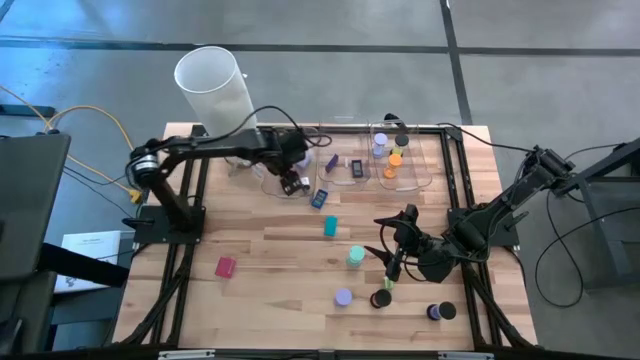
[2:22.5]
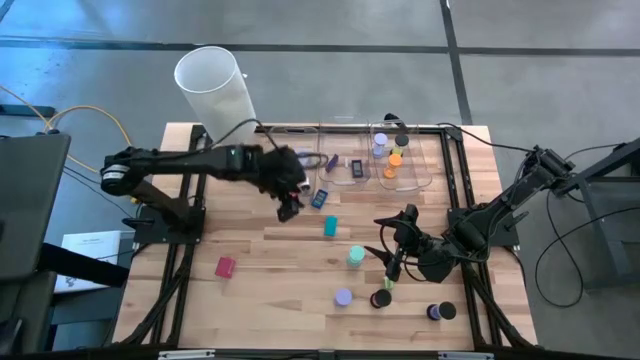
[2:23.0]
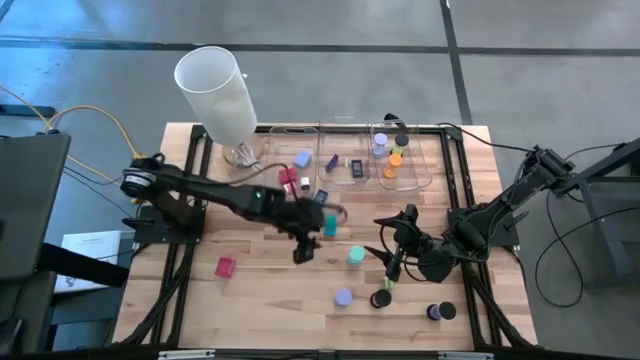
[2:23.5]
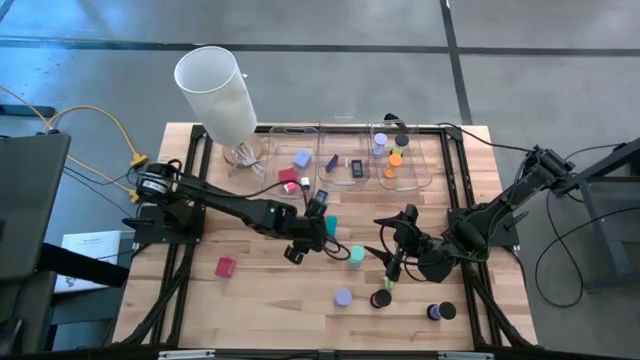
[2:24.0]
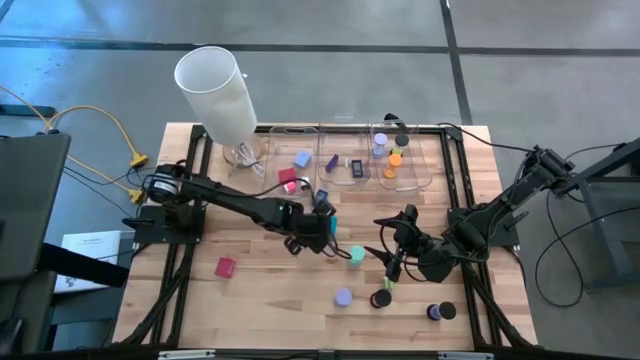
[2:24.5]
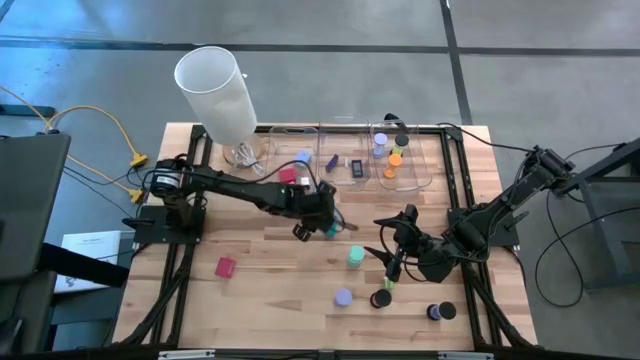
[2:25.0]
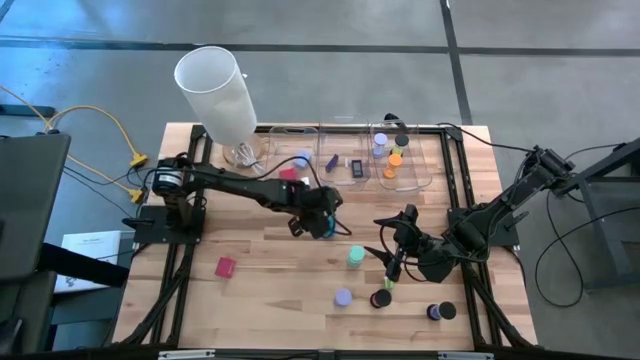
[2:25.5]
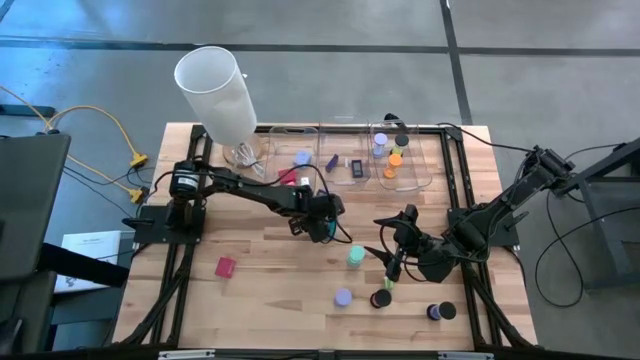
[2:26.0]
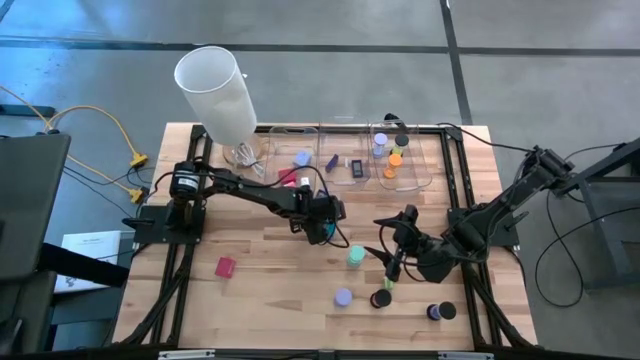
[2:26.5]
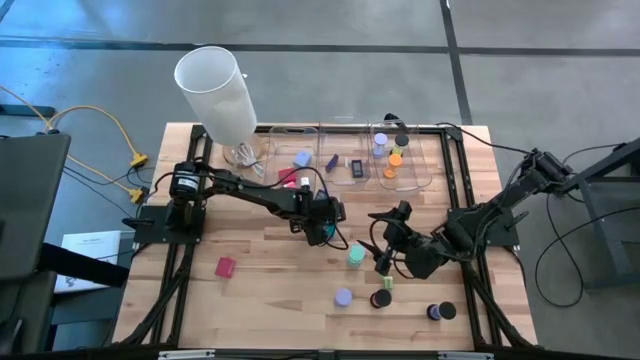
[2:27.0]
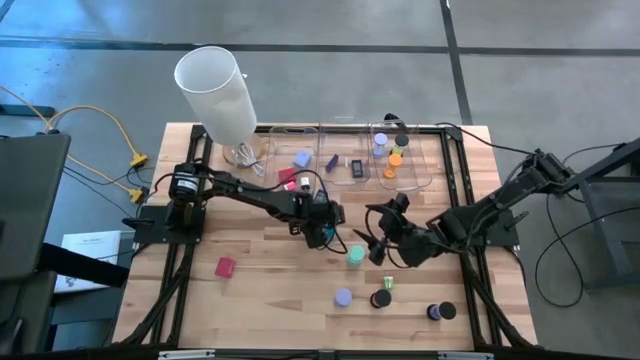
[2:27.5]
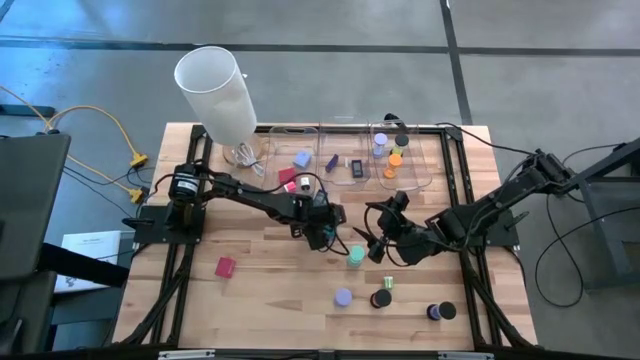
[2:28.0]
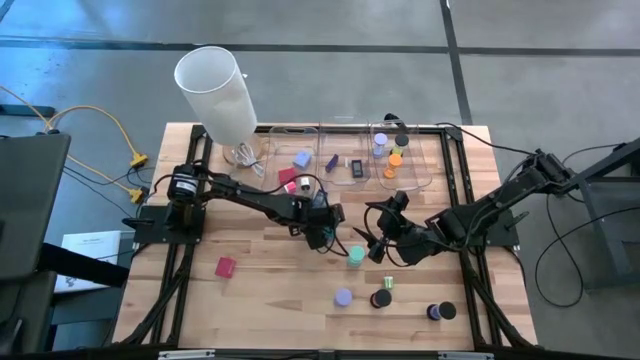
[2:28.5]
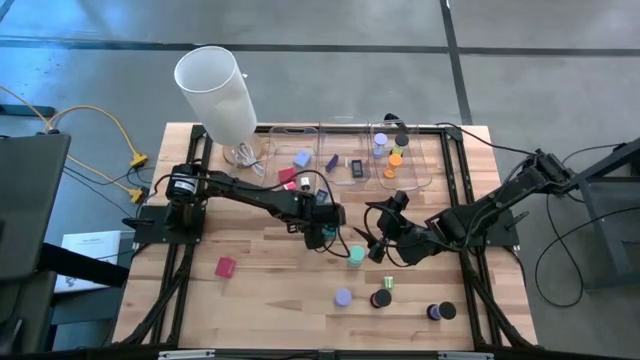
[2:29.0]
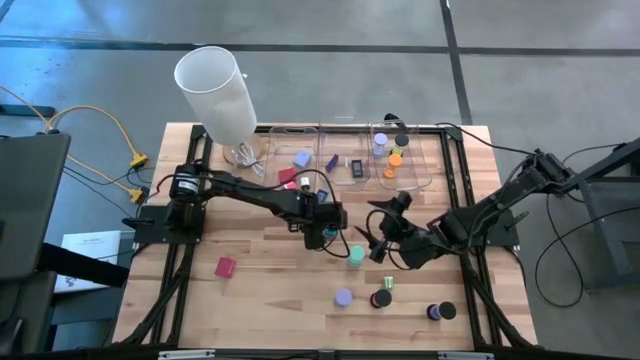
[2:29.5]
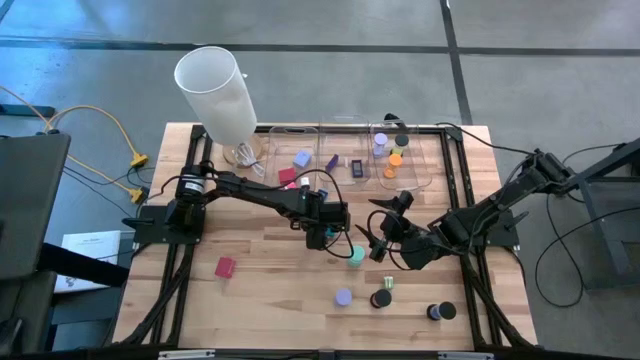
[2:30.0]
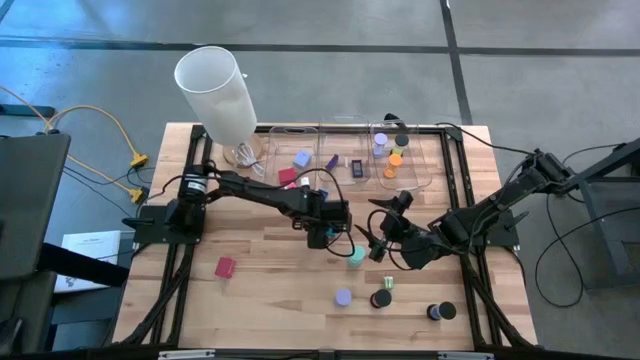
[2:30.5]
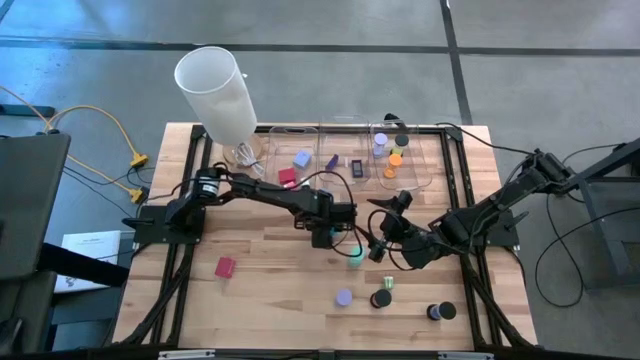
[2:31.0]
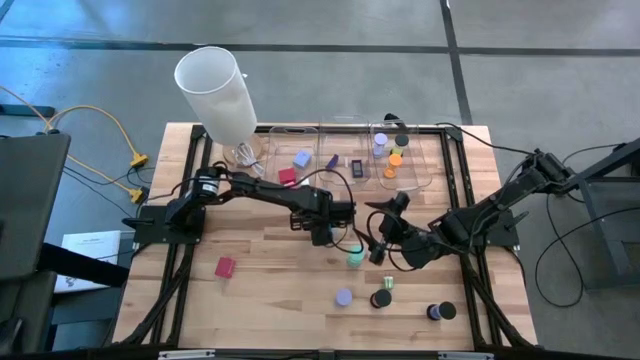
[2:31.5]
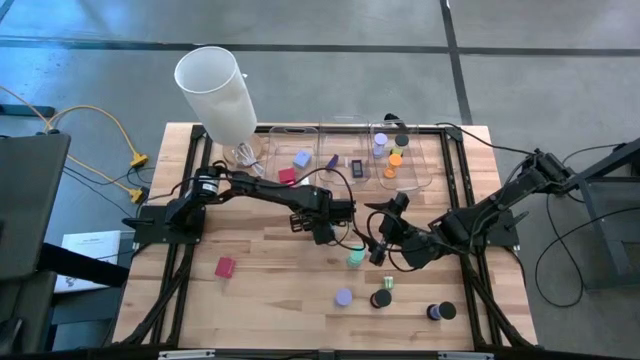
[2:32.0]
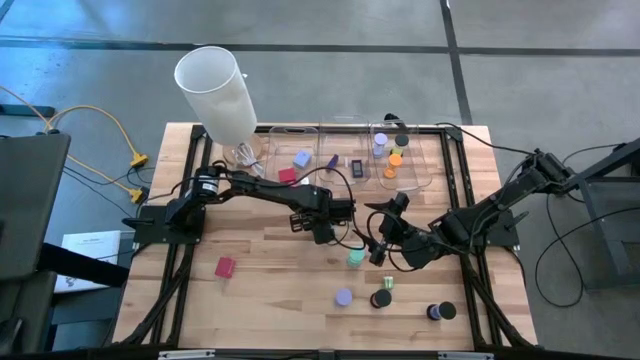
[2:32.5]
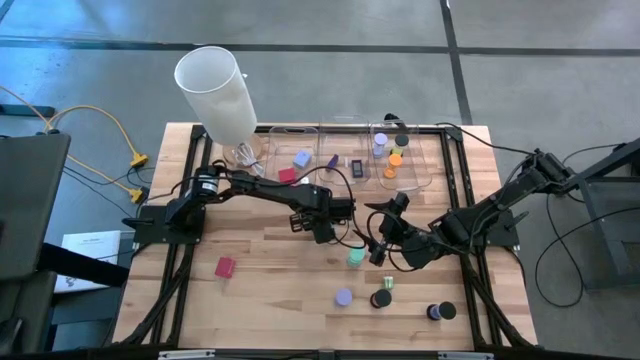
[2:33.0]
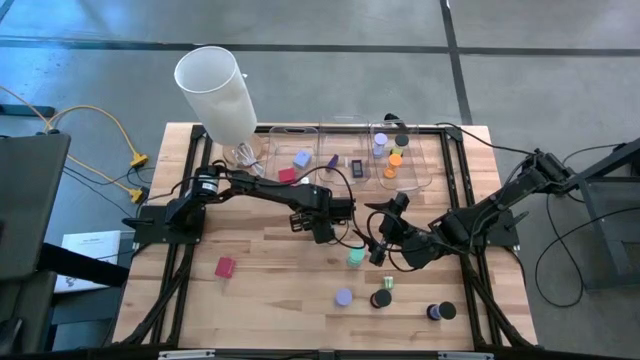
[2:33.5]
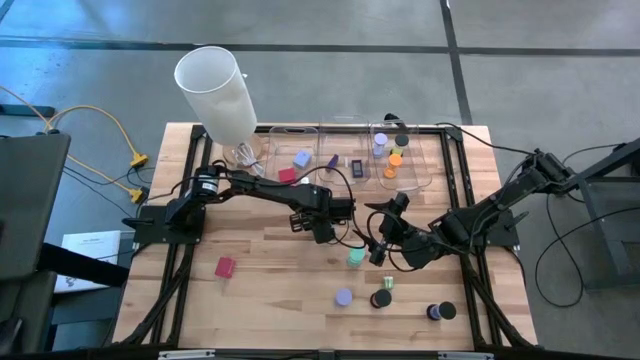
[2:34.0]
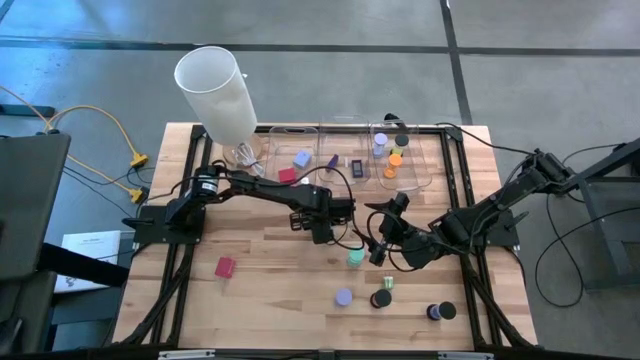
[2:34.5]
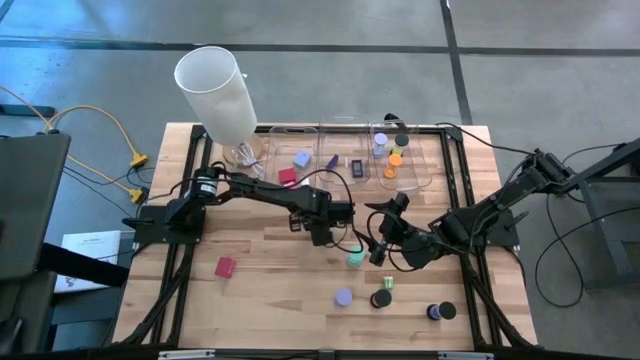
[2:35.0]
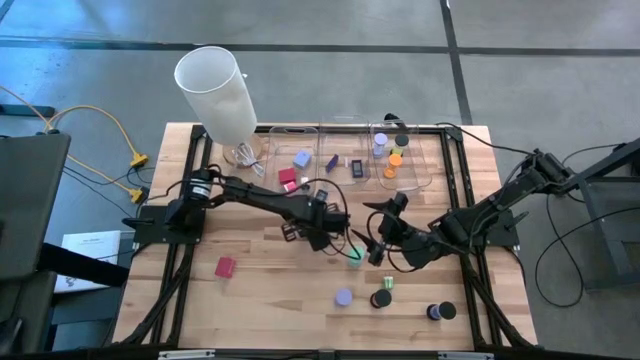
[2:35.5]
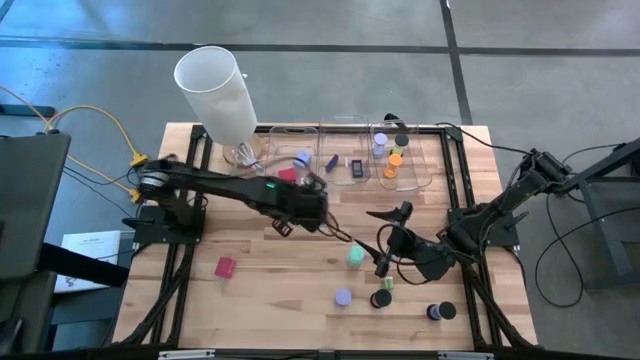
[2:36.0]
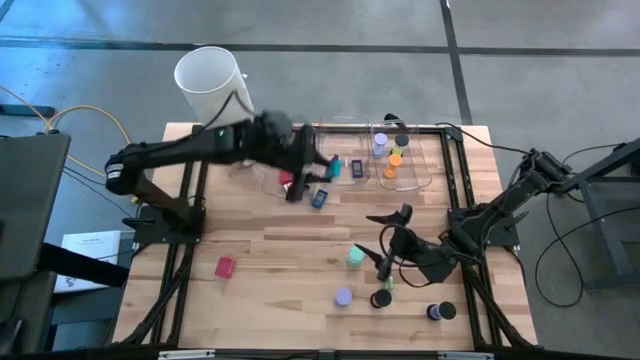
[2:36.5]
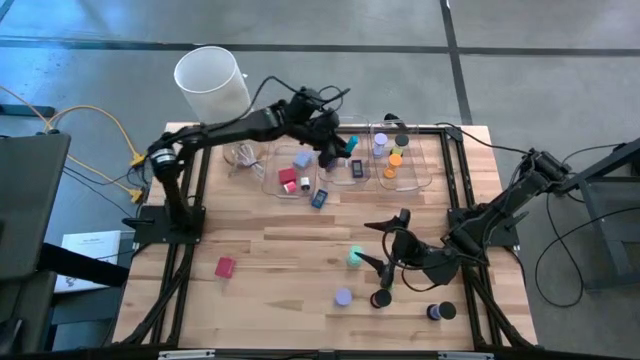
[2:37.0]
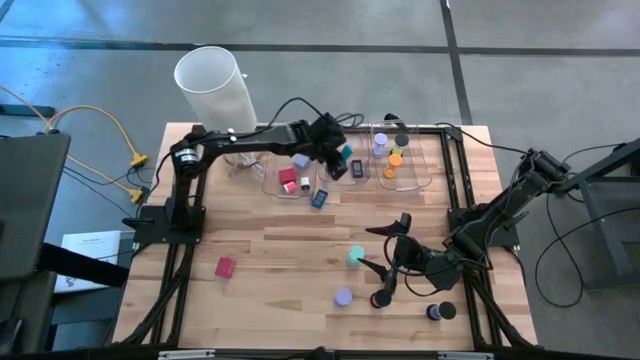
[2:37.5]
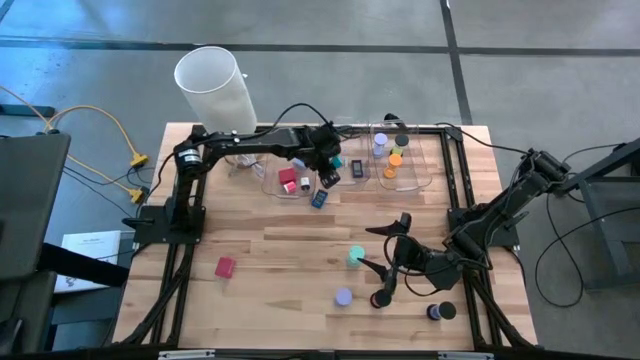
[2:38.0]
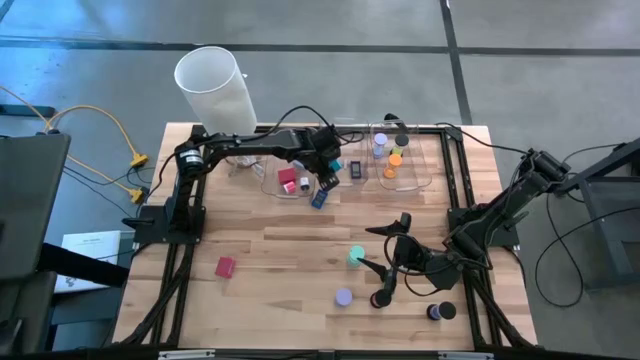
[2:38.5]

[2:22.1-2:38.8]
Task: Pick & Place Office items
Put the light blue digital clock into the middle transparent bin

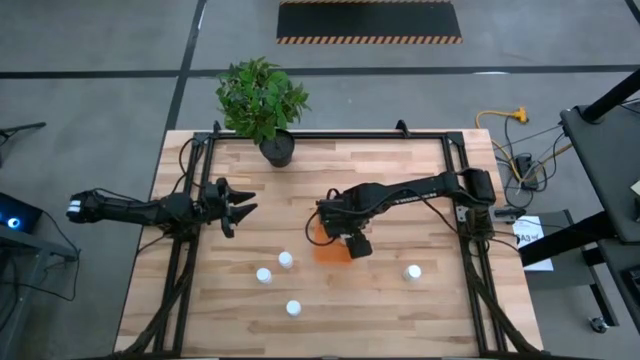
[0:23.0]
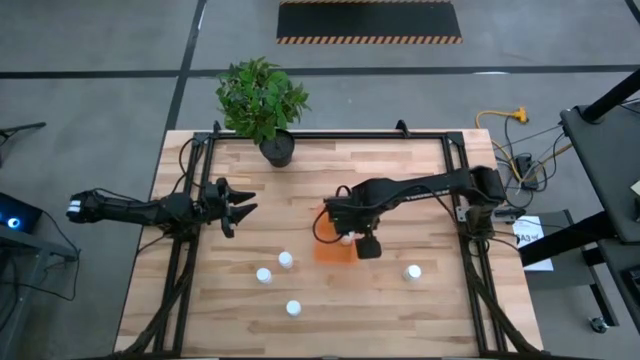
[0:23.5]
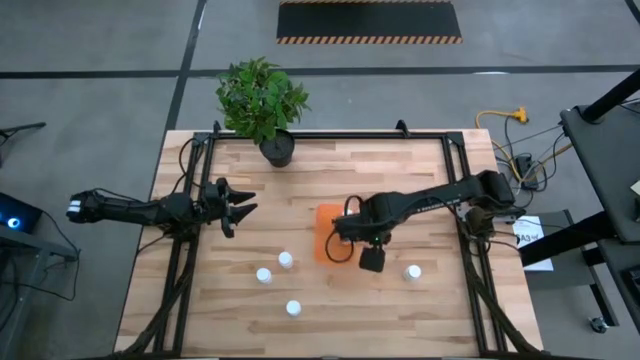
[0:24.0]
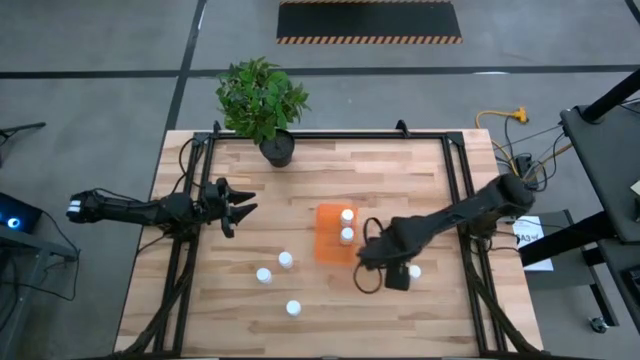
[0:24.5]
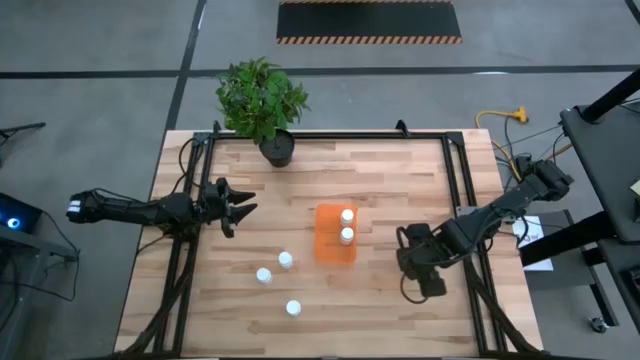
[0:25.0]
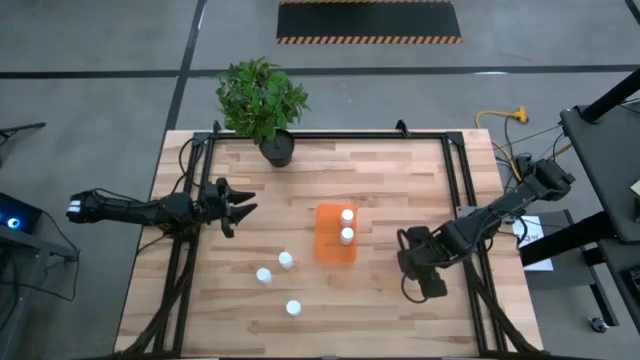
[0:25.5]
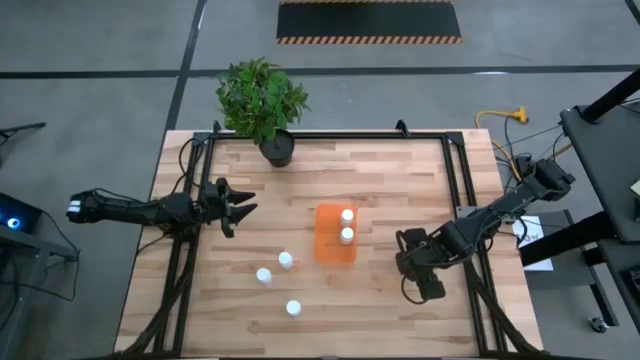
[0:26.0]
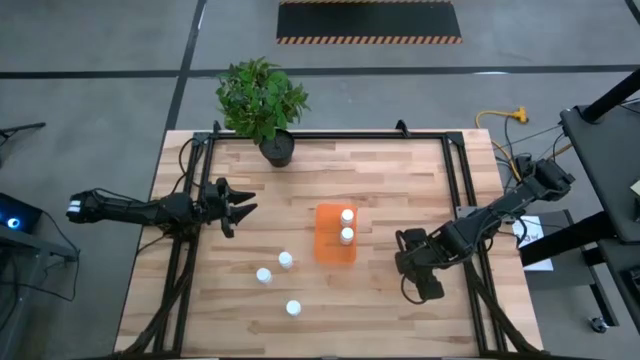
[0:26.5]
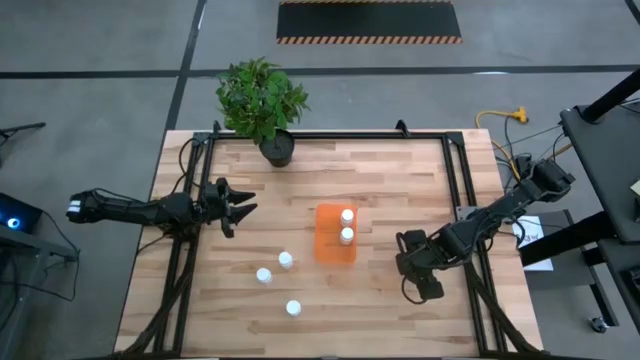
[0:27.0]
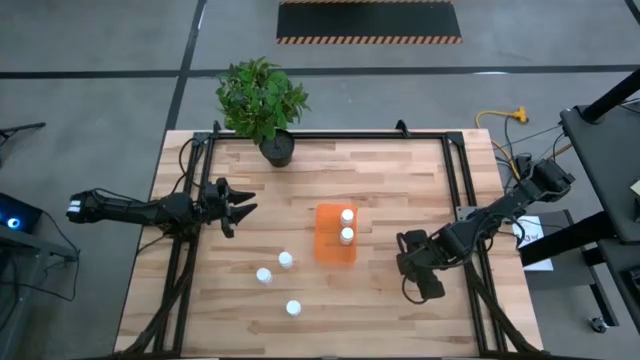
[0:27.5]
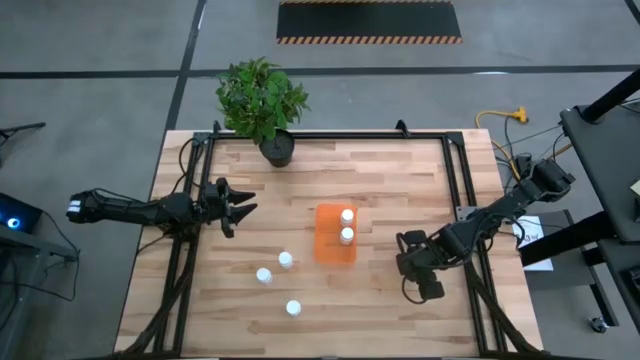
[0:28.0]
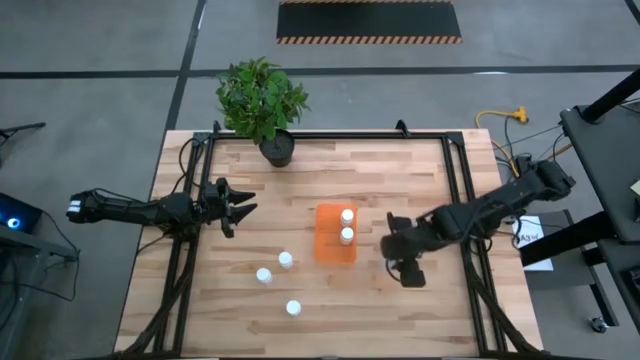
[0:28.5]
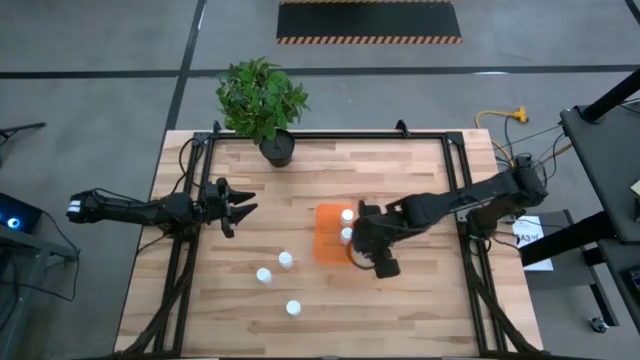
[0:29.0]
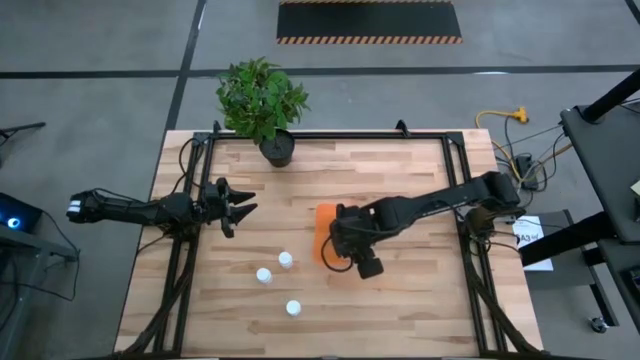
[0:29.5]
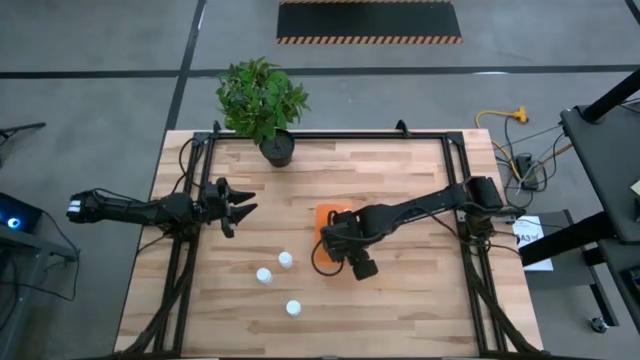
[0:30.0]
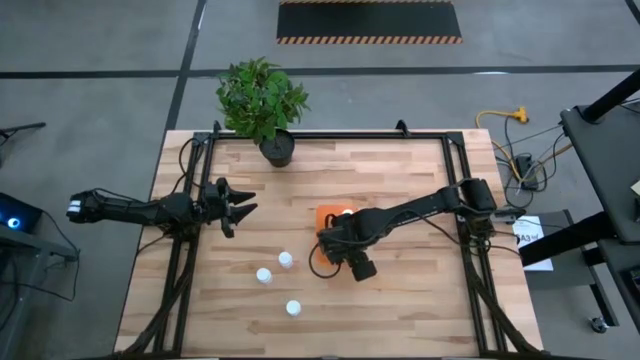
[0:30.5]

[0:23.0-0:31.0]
Task: Pick and place pill bottles into a basket
Put the white pill bottle into the orange bin
